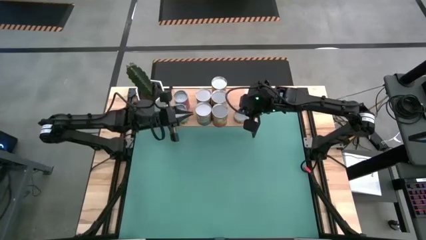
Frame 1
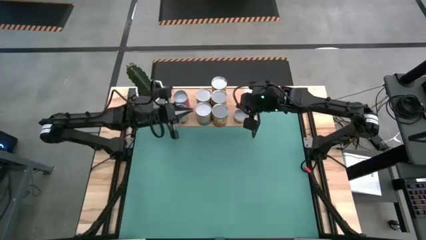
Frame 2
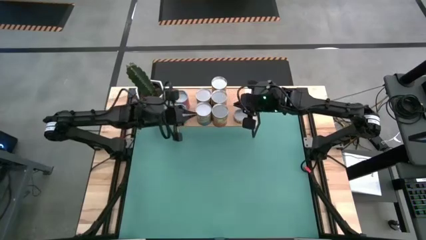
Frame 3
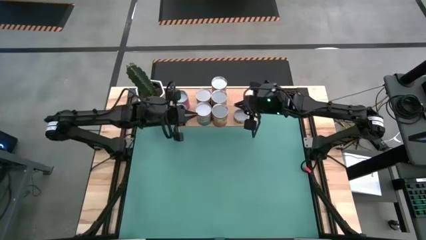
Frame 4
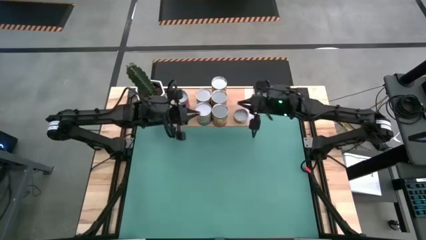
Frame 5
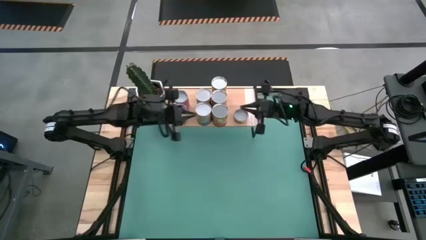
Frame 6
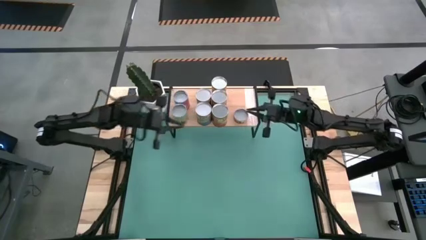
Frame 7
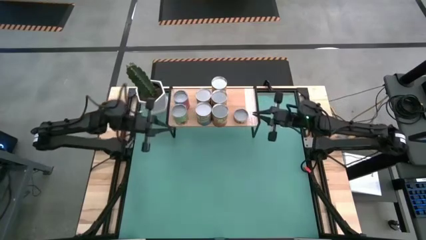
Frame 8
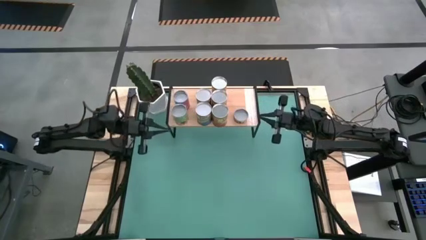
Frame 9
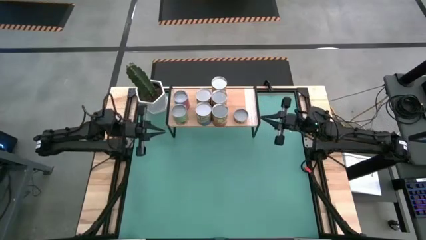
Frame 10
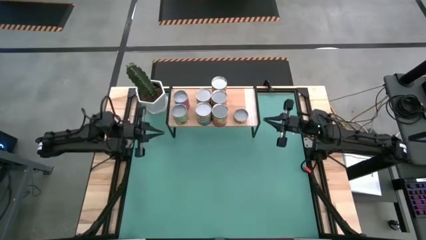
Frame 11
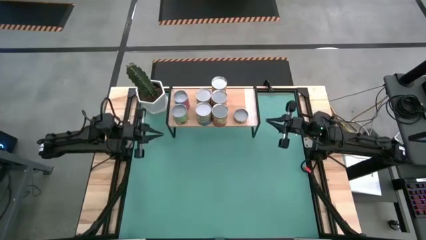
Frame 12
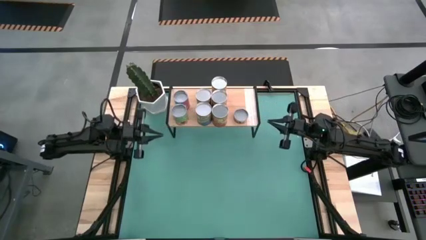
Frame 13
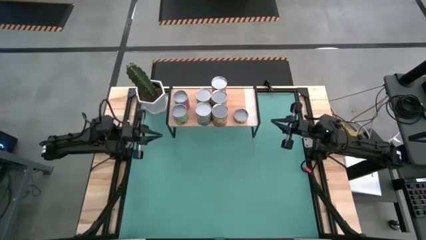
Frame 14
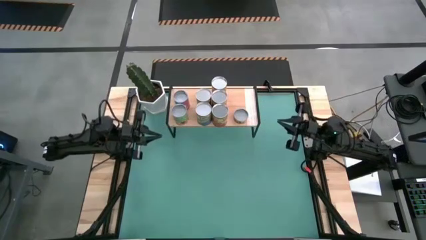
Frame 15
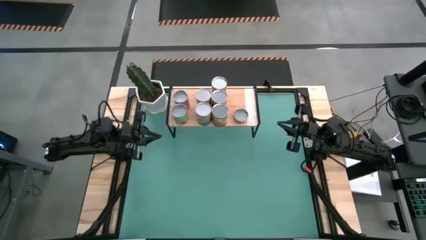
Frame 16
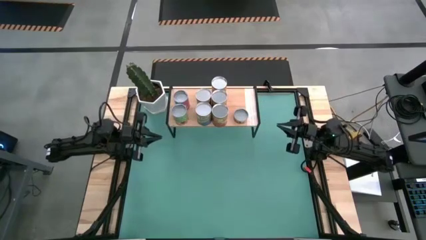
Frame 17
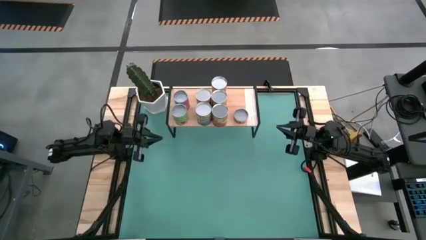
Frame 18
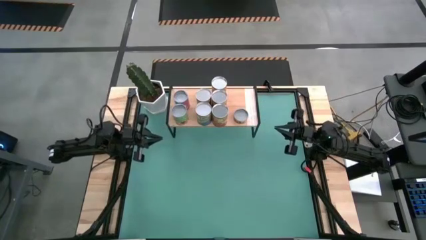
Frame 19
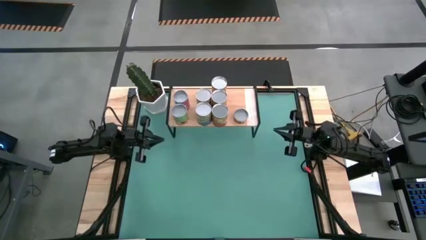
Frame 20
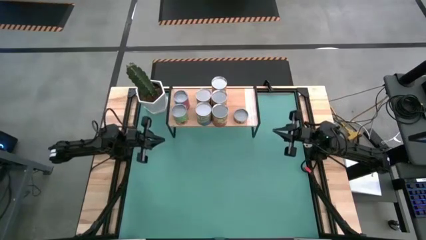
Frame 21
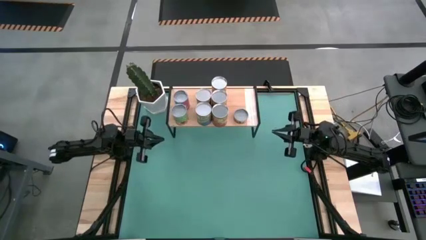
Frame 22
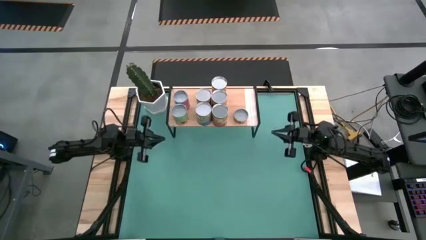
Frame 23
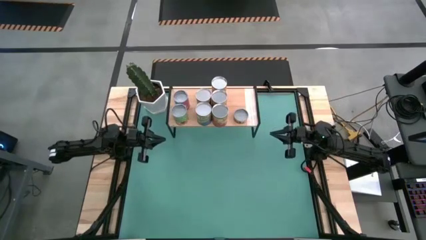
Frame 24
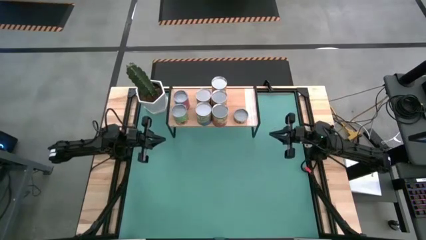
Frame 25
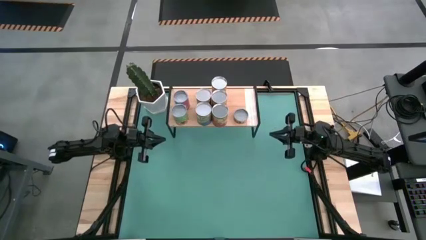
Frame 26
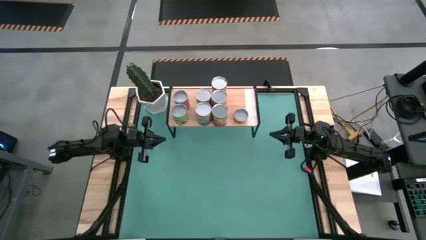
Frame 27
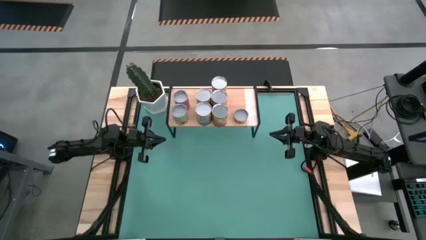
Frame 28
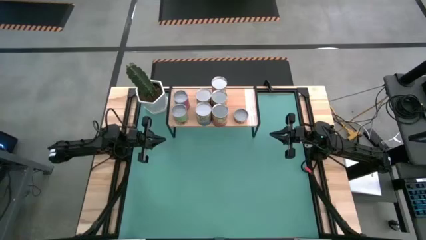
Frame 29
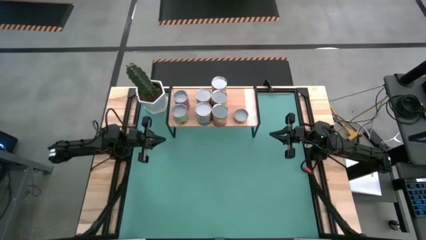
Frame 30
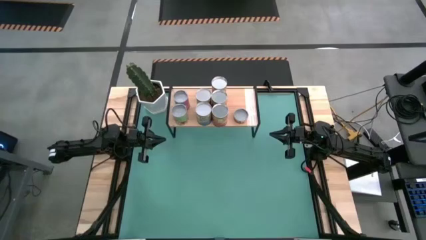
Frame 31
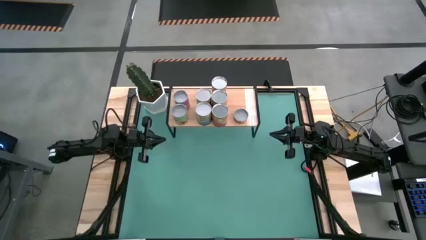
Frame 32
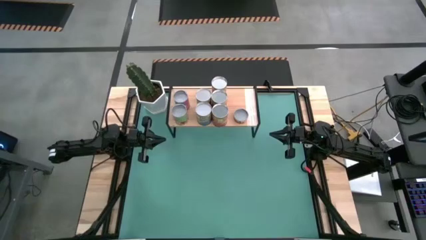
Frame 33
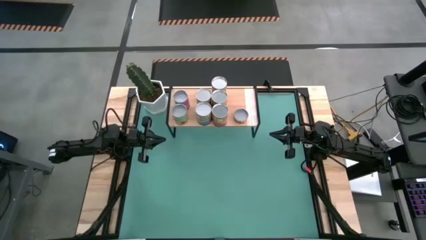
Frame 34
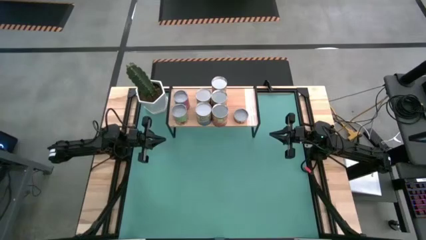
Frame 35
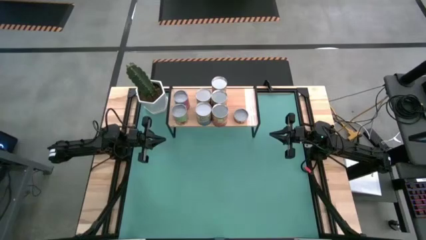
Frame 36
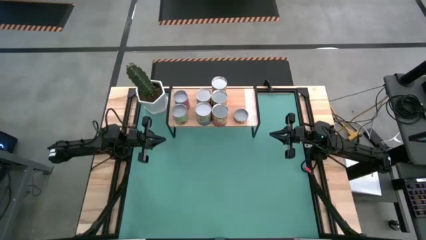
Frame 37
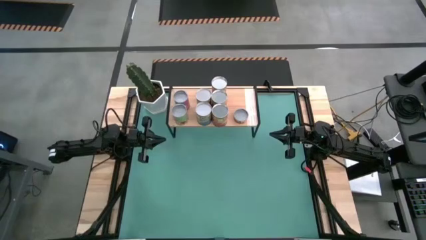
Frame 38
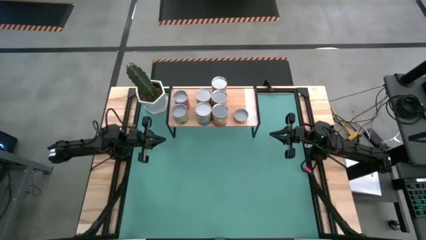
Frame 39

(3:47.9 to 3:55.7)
Task: Pick and place cans onto a shelf
Return to Home Position

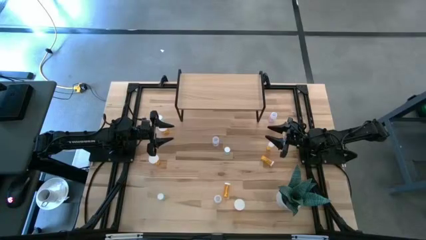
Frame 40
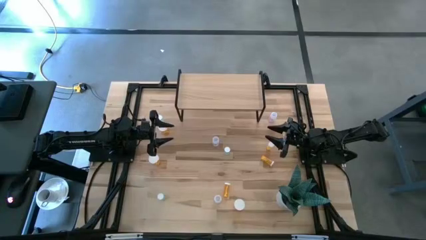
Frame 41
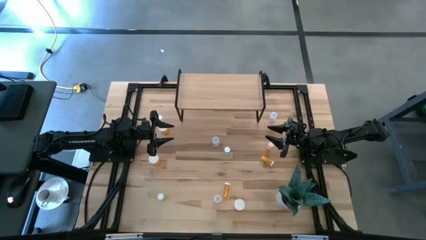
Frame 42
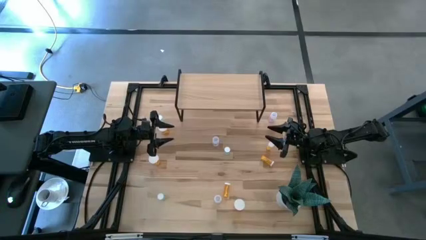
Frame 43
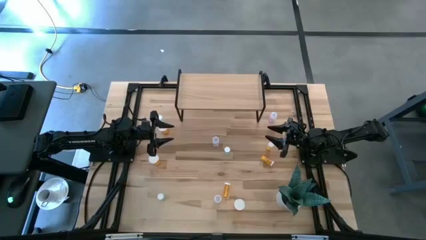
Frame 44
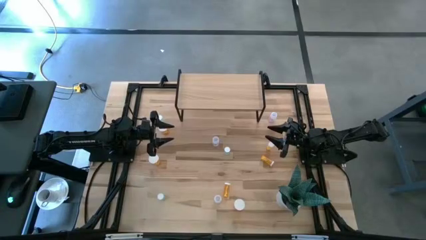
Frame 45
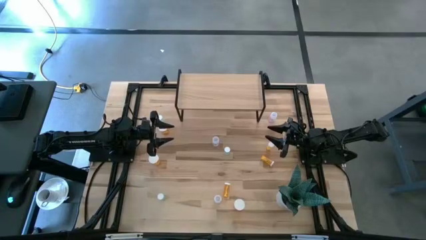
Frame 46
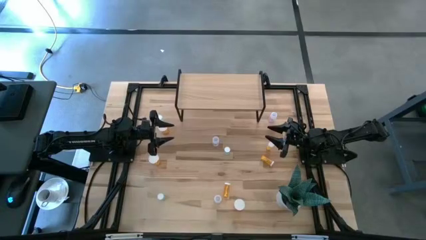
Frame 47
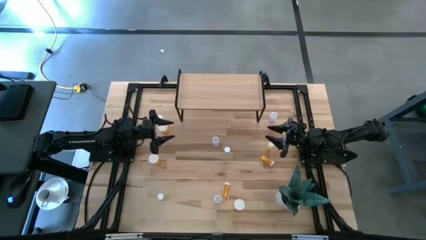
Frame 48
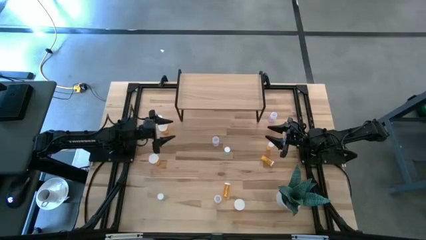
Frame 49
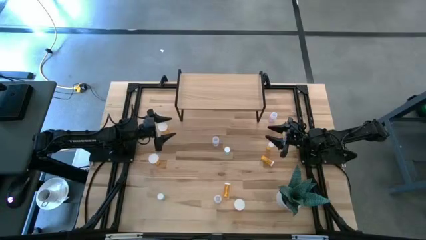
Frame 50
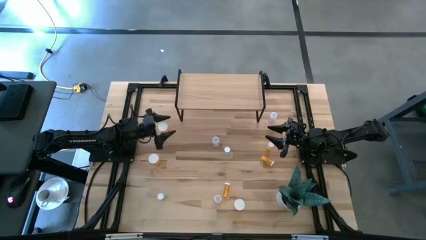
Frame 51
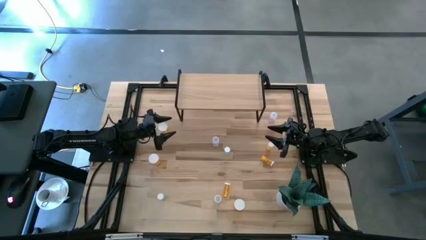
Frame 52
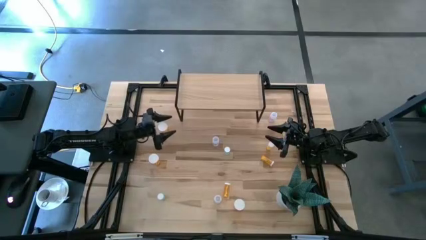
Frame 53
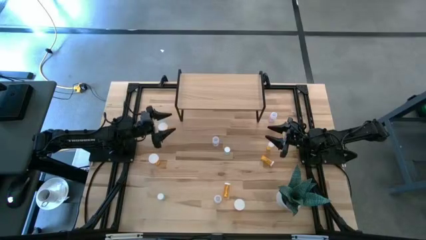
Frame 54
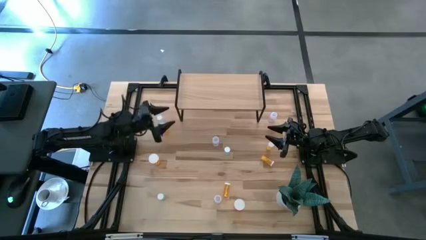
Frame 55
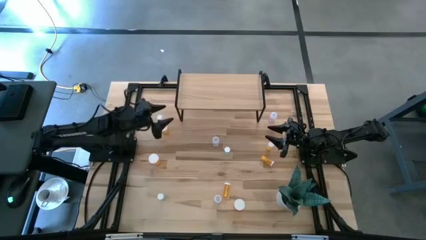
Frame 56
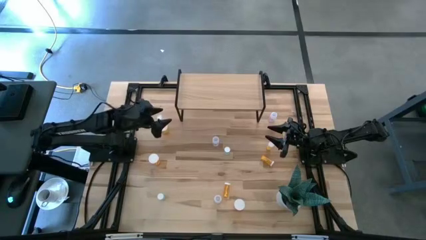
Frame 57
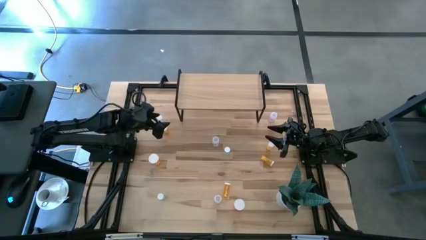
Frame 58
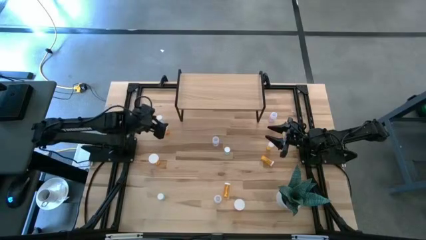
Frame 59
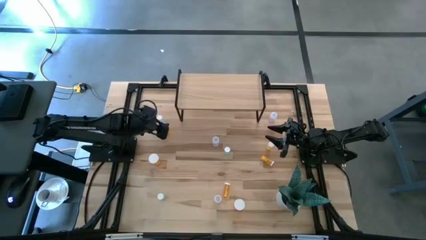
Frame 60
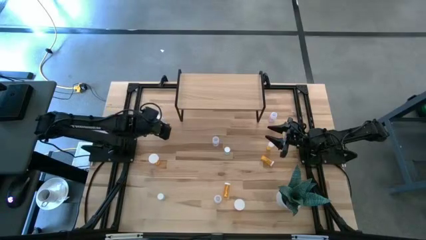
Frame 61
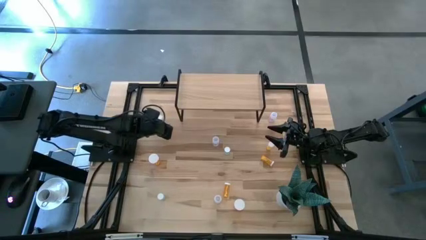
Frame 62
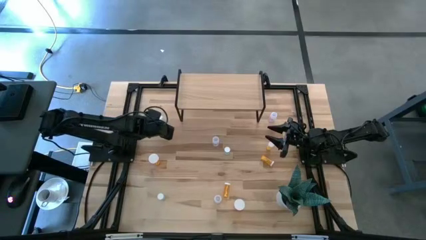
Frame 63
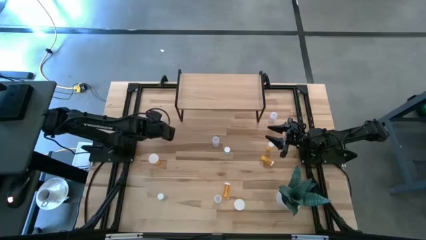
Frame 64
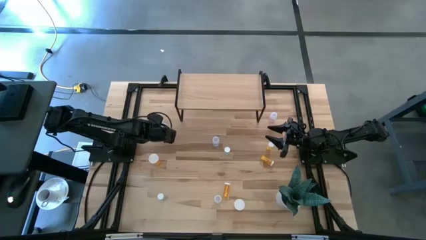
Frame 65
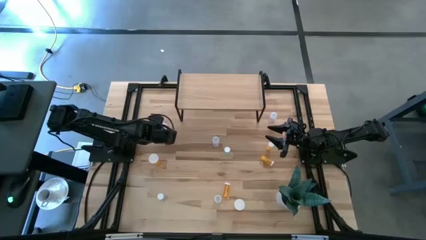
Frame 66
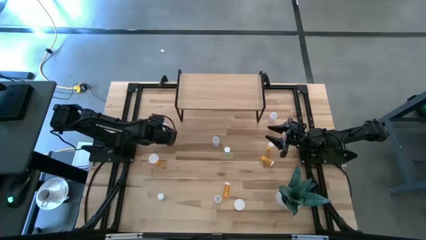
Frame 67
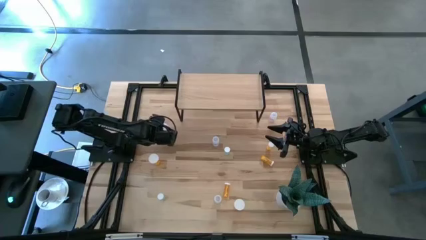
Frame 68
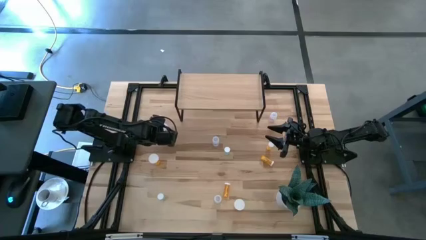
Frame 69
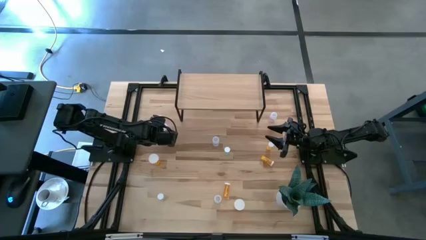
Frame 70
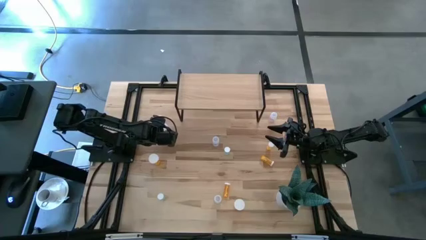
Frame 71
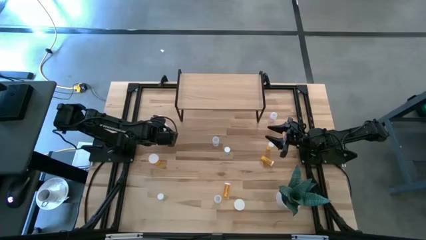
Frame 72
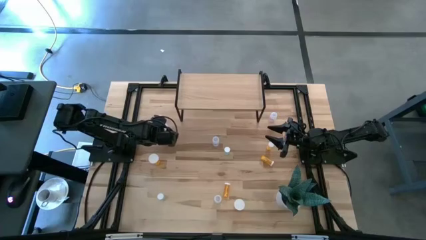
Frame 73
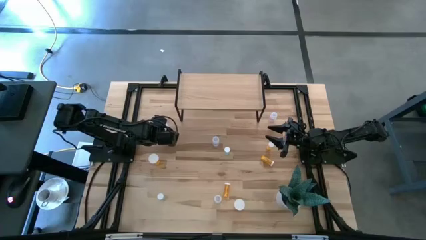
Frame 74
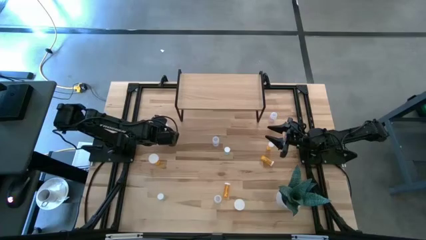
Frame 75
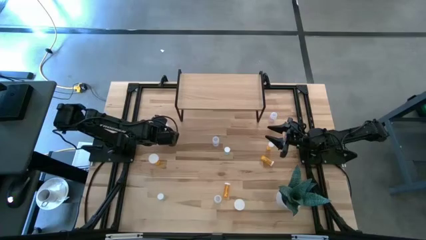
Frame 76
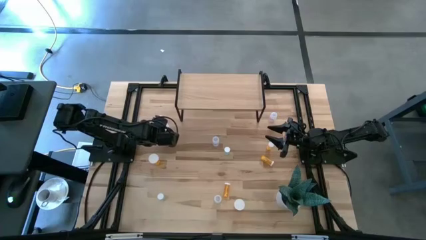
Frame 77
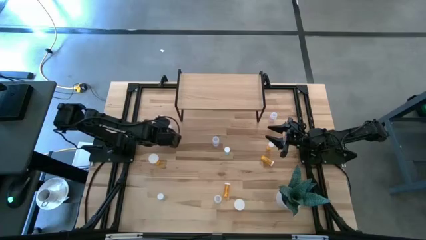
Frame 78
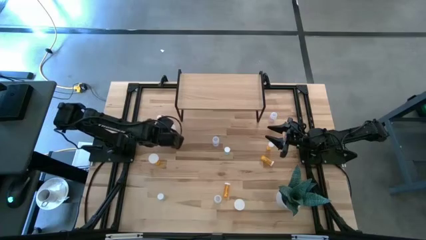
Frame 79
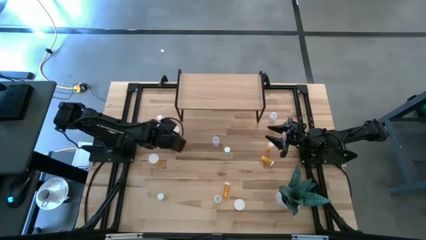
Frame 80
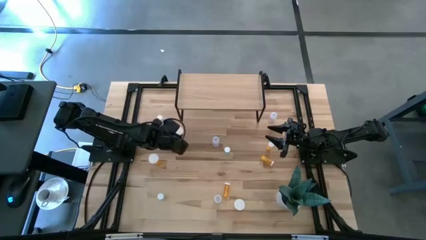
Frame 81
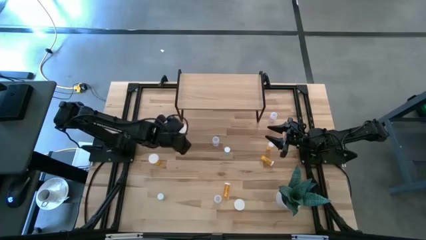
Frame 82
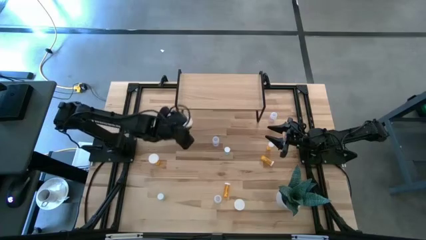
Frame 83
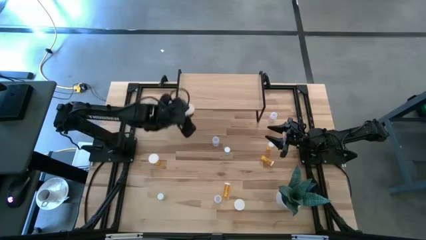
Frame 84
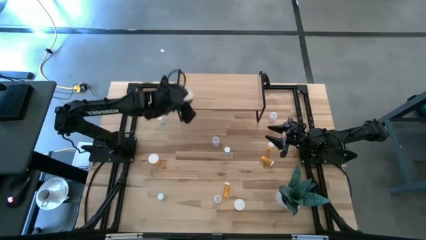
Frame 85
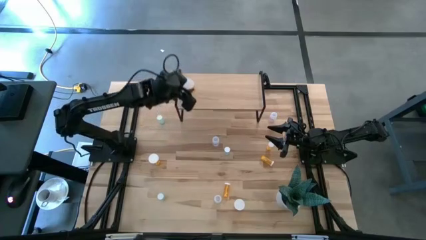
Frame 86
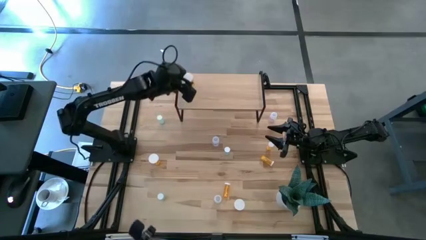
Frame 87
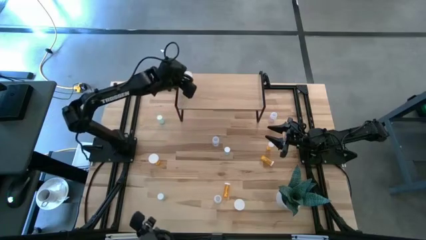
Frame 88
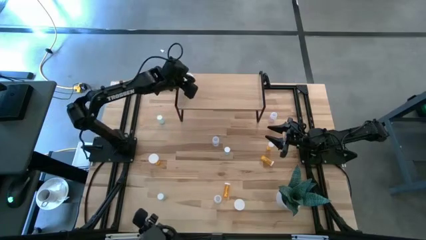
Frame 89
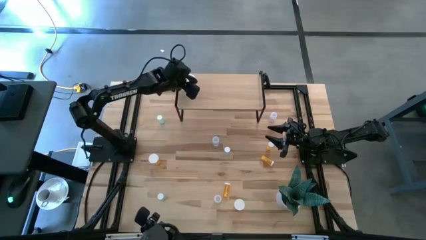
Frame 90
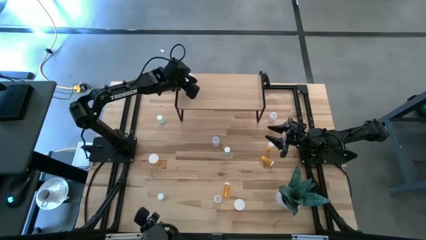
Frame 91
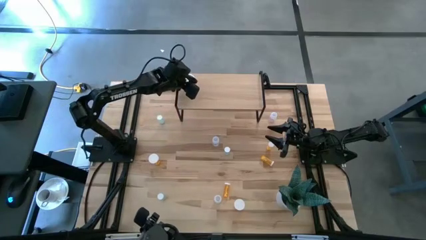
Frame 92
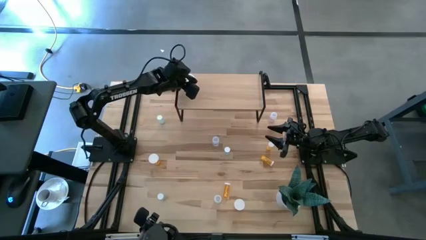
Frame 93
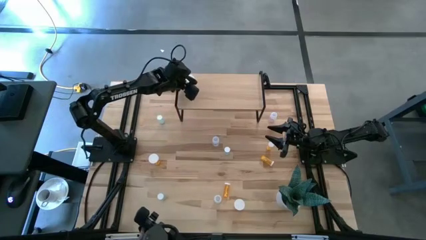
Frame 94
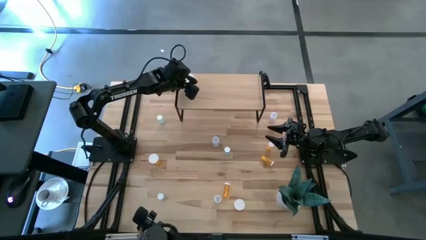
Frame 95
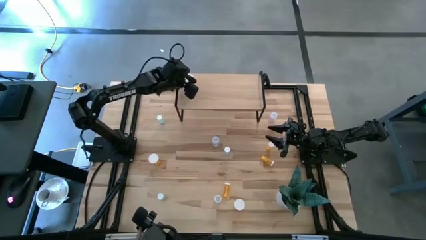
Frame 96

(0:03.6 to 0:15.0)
Task: Pick and place medicine bottles onto shelf by color
Put the top left large orange pill bottle on the shelf
